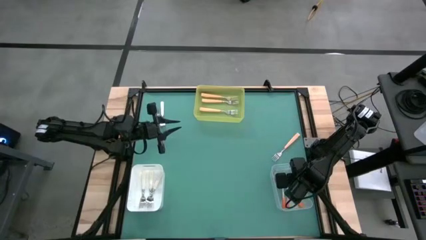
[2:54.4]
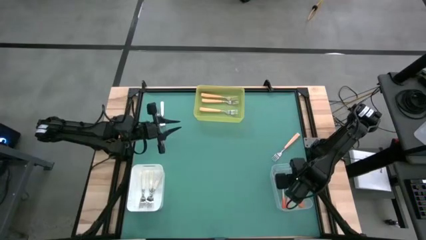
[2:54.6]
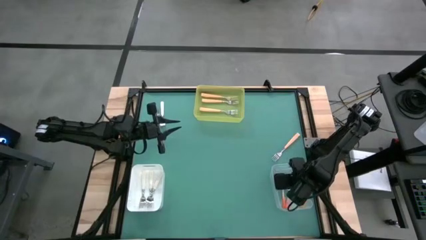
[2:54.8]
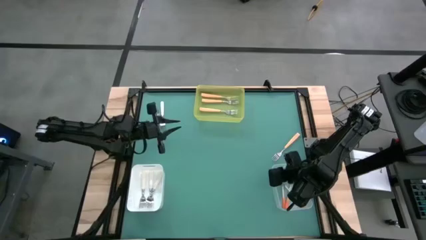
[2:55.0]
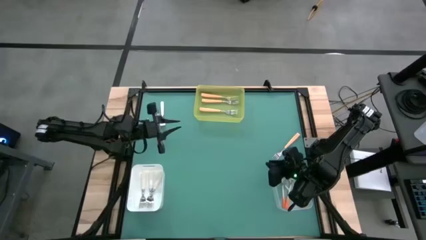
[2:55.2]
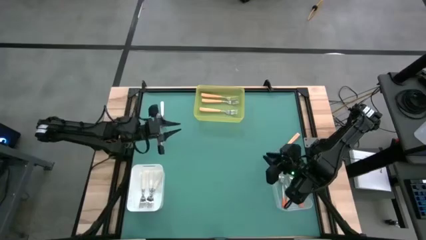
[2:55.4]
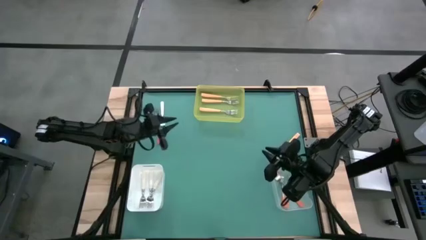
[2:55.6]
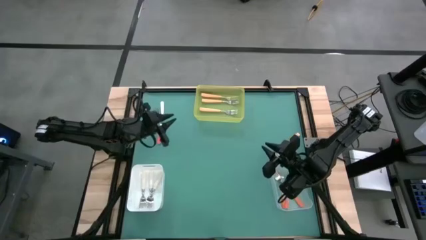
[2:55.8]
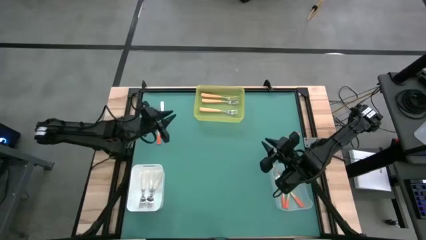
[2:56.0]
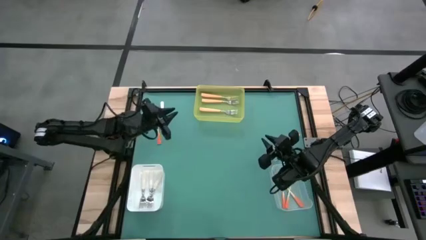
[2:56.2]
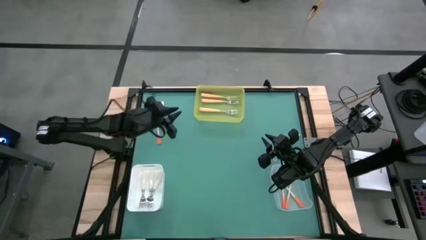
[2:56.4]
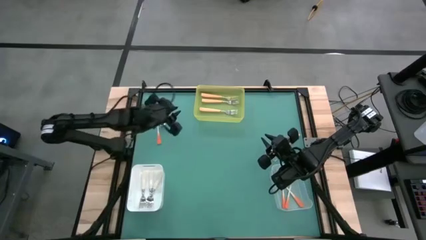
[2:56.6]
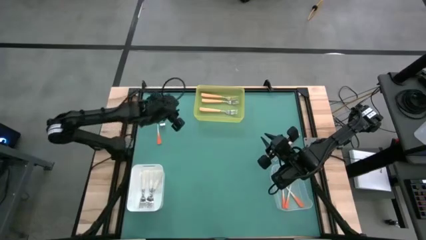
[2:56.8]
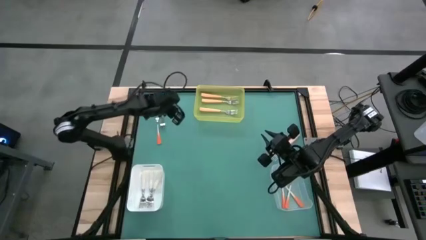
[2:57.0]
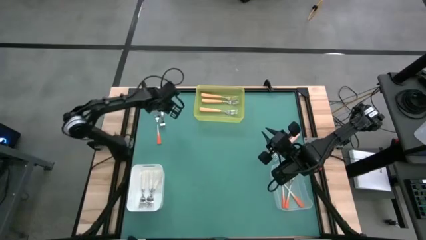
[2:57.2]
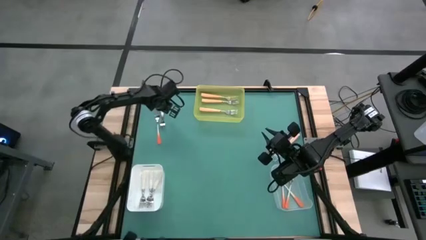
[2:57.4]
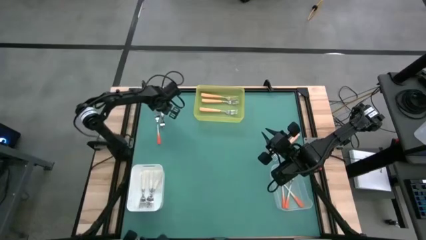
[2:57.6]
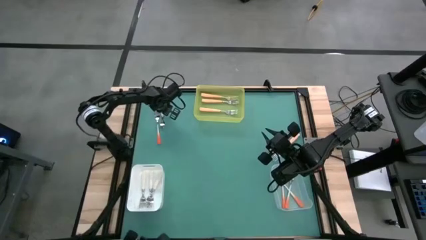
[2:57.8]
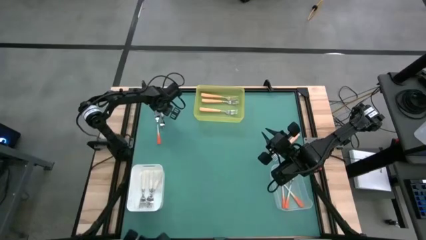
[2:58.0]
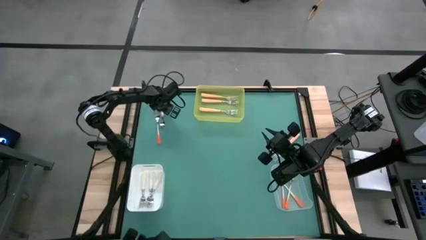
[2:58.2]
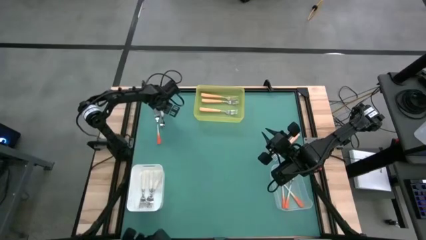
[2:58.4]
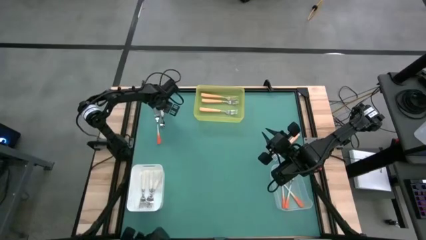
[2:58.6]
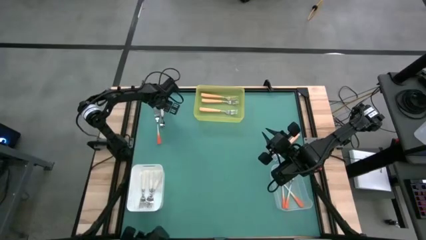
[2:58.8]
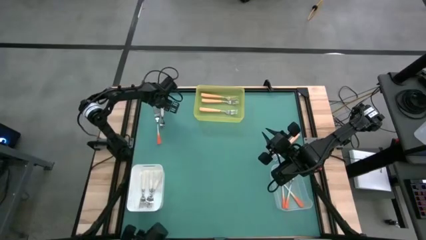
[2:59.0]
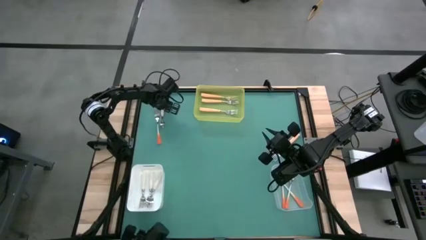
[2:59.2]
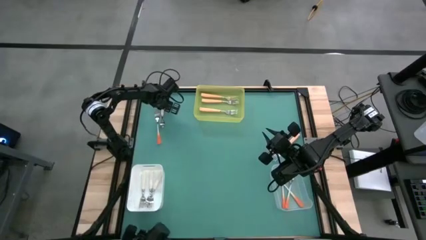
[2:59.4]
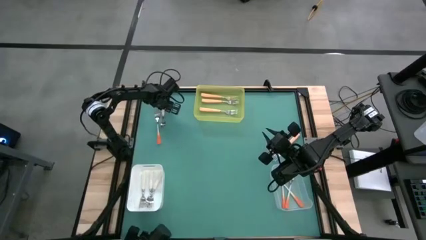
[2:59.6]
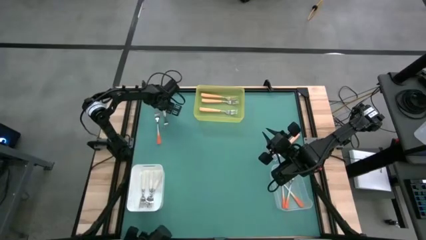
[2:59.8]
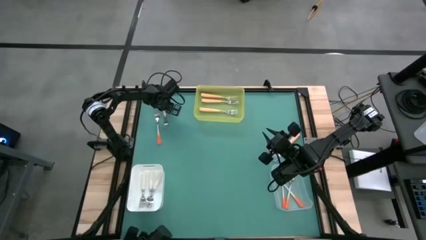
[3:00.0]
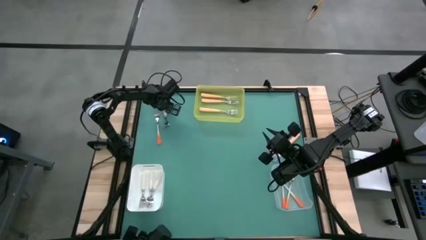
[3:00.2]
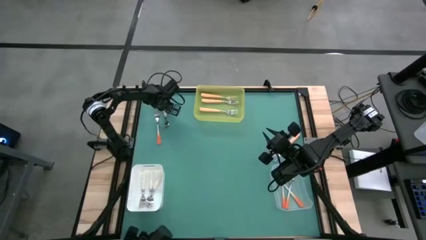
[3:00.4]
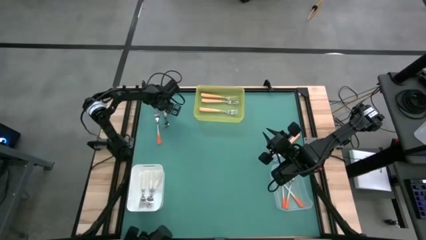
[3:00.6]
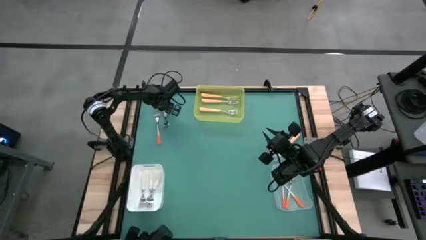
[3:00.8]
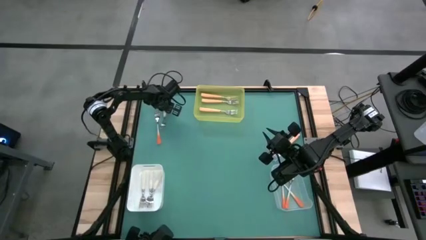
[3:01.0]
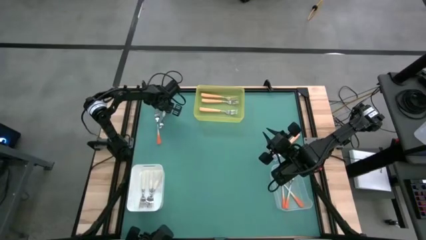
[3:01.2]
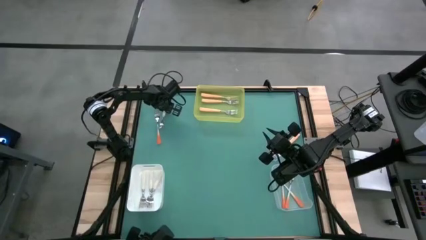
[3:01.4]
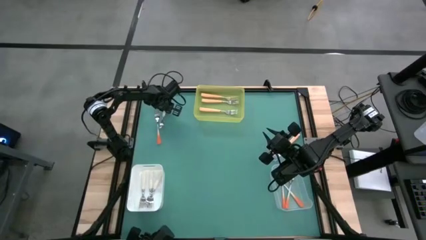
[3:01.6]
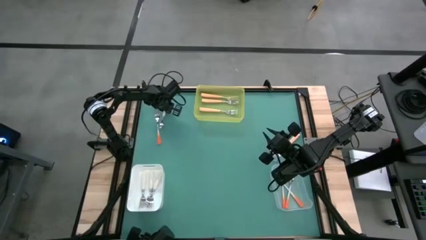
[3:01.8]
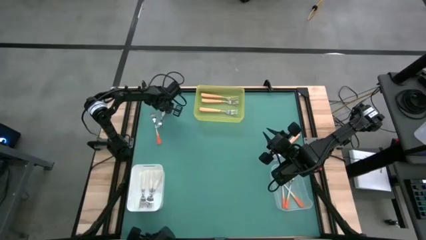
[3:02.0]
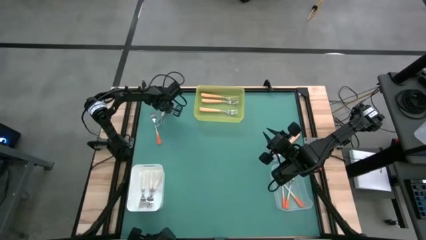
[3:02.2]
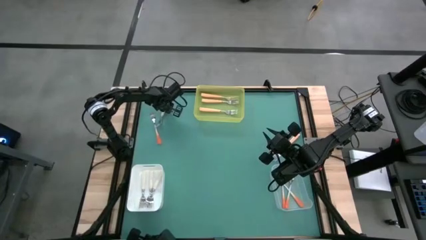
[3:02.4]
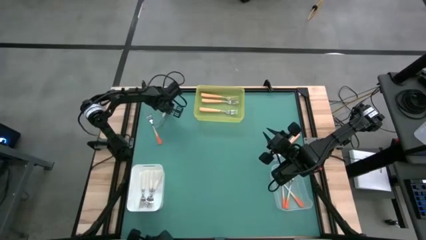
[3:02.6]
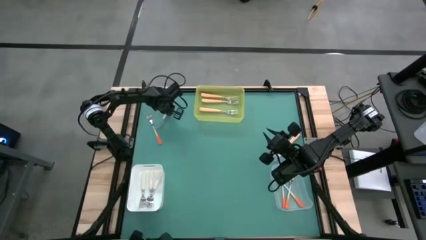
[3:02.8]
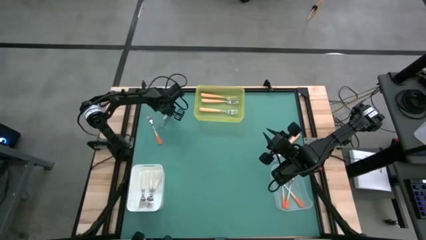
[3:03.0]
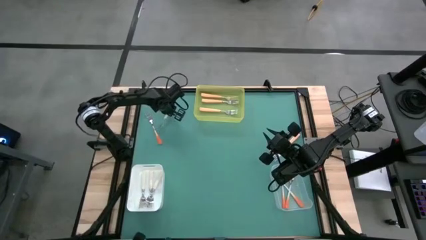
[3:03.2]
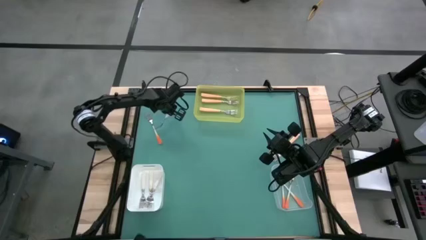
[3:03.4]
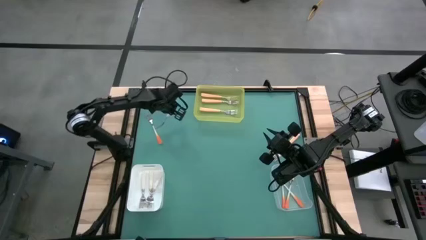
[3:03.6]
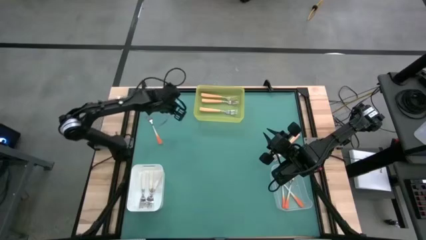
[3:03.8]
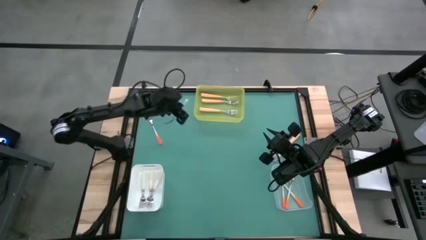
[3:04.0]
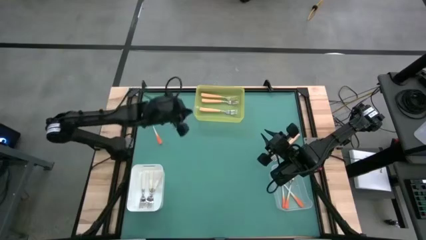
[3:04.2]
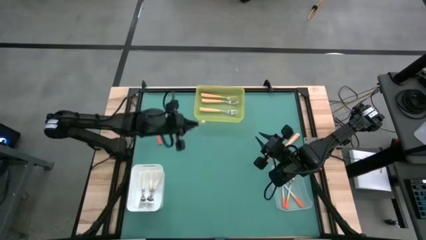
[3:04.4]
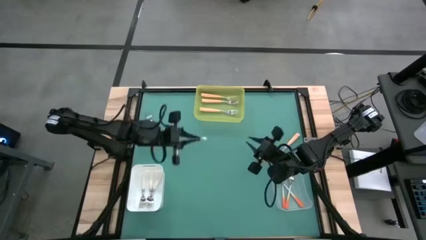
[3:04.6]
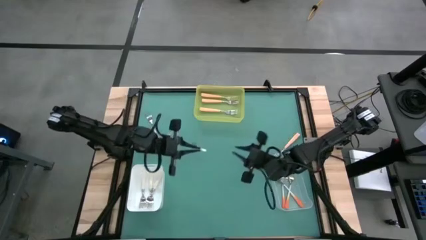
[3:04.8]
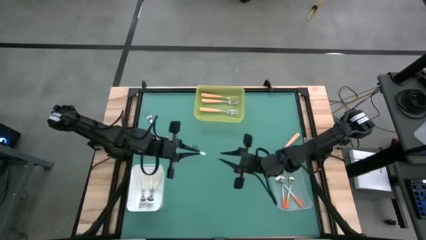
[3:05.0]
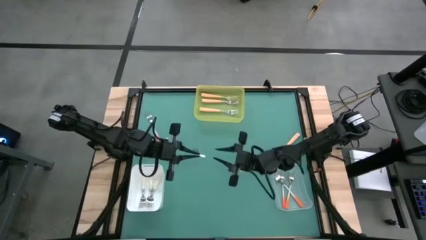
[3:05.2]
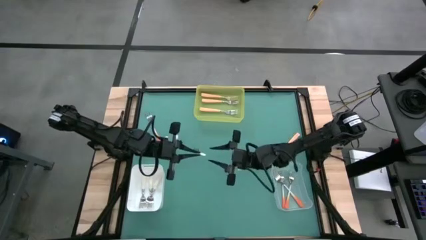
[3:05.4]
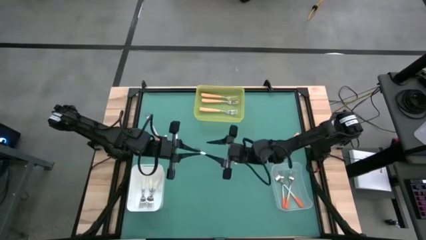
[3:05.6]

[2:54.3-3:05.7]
Task: Sort silverware by color (type)
Put the white fork into the white bin
